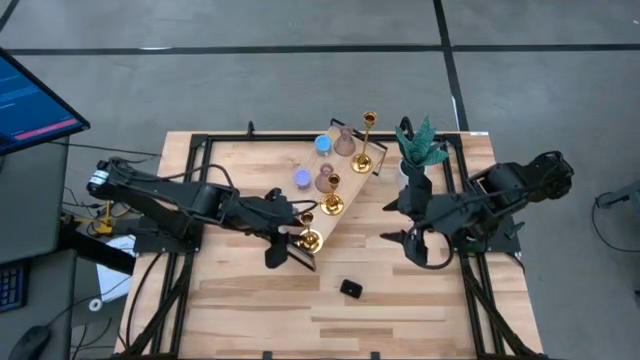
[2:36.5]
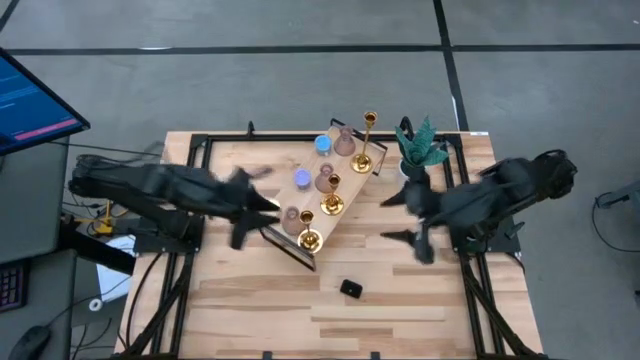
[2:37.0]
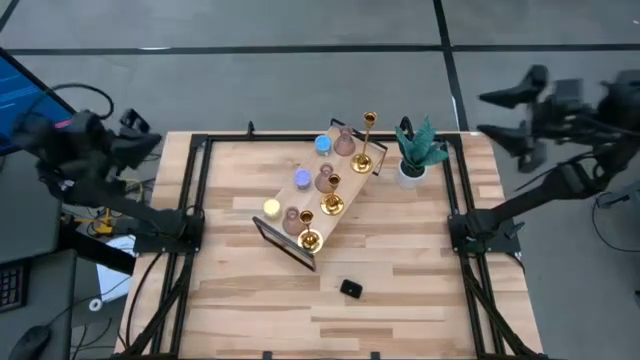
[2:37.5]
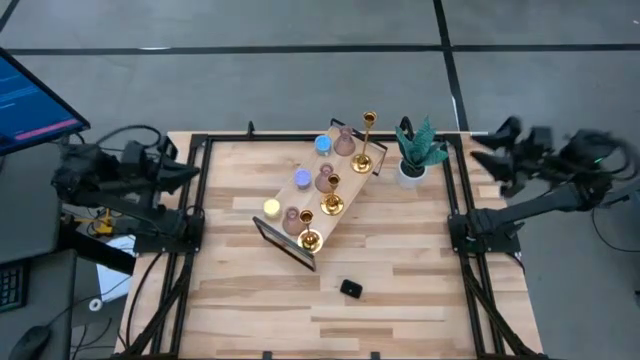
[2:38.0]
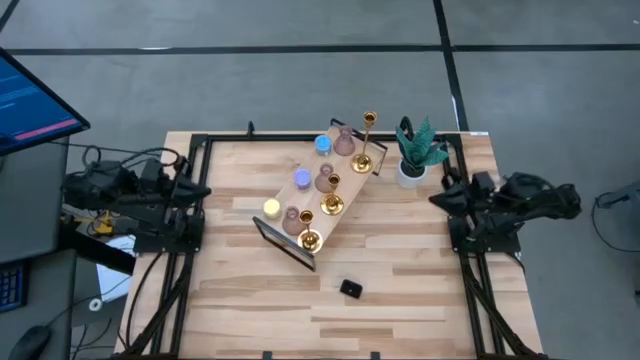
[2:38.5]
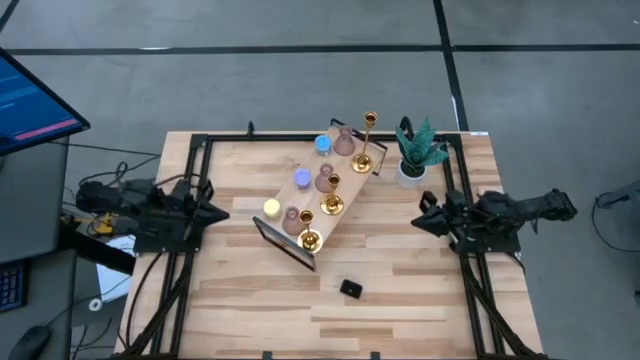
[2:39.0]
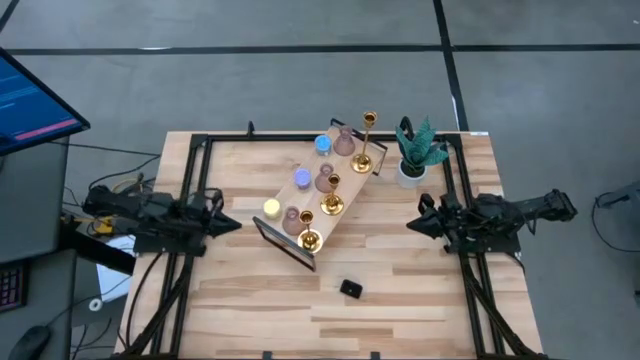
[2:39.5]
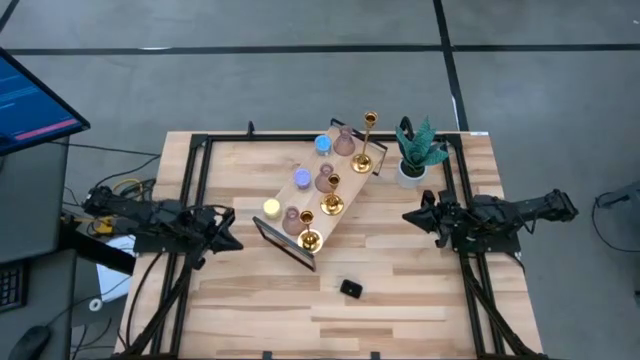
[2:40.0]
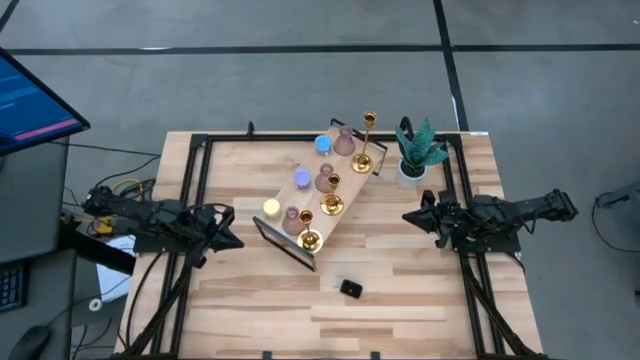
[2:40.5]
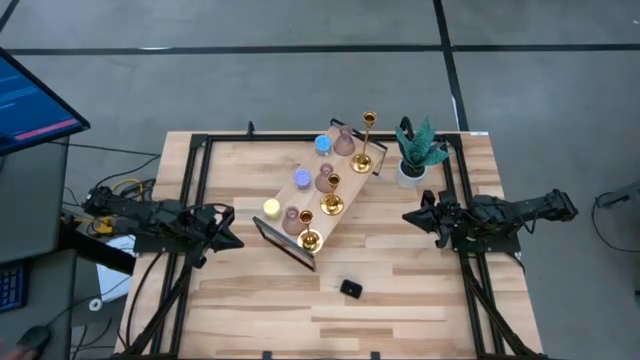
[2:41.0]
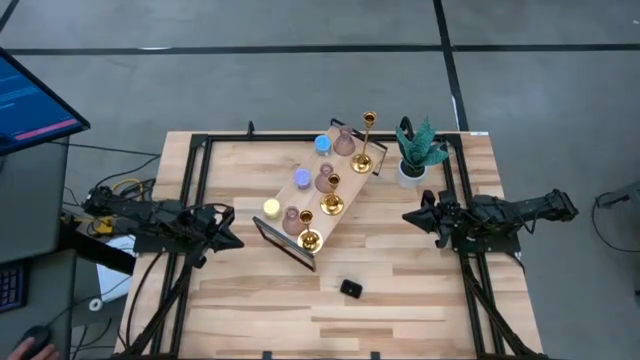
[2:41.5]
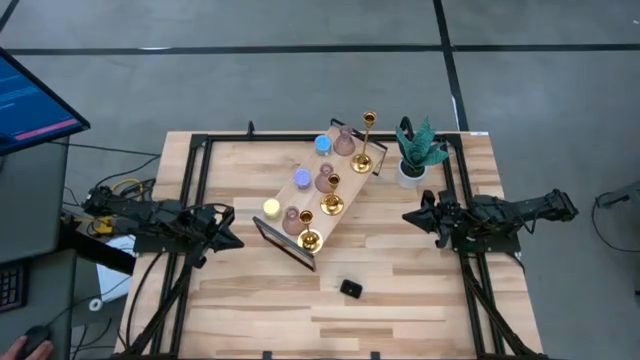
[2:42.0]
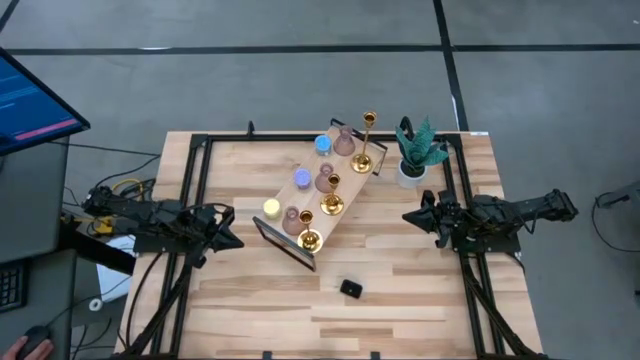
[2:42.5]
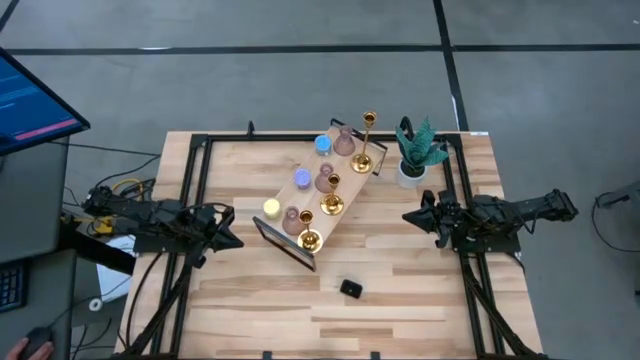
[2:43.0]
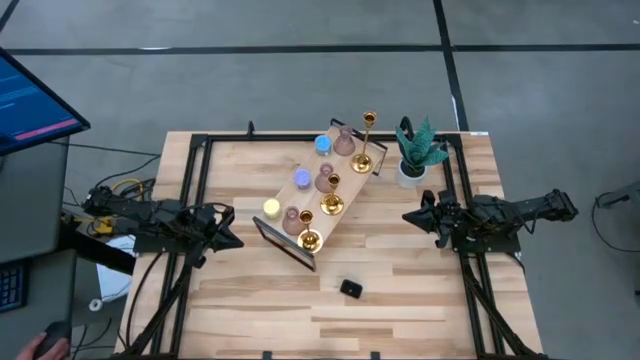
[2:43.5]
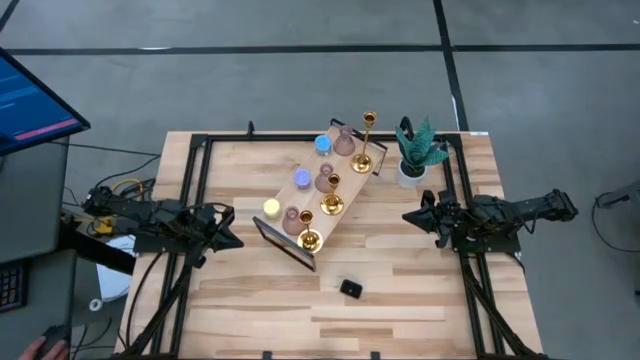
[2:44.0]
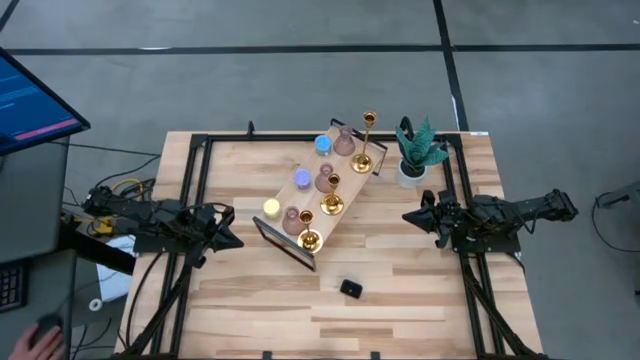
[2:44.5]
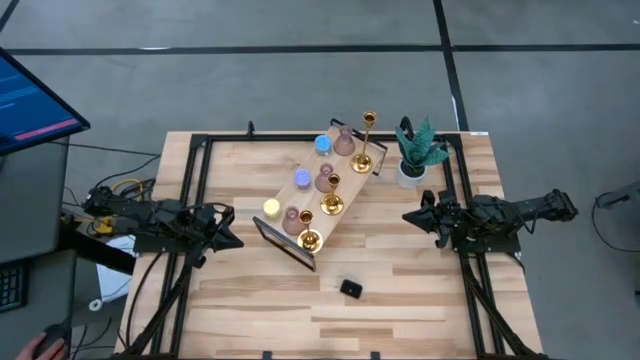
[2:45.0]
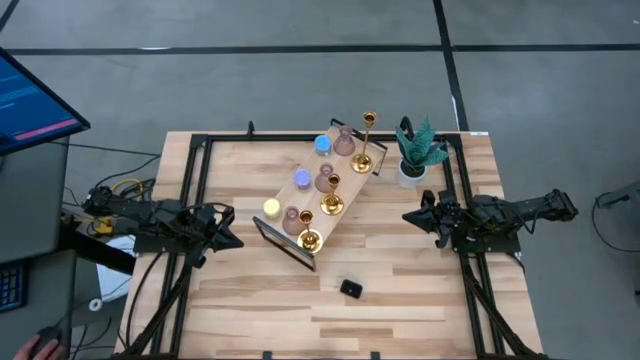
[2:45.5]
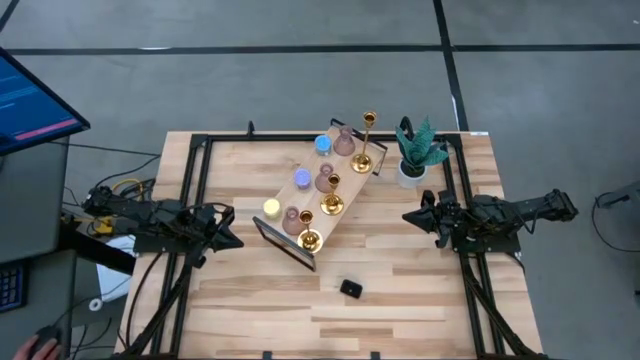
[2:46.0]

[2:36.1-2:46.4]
Task: Pick & Place candle stick holders
Return to Home Position

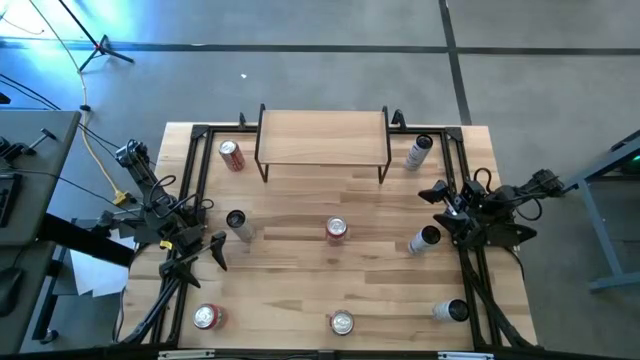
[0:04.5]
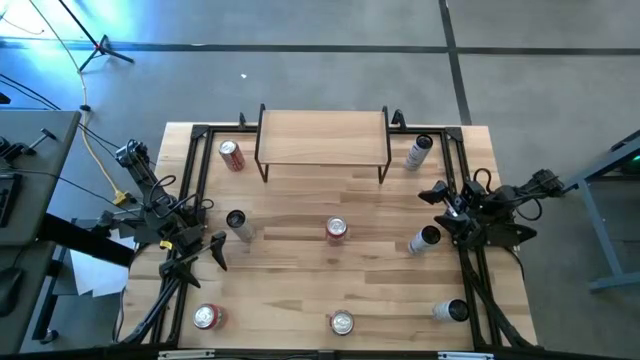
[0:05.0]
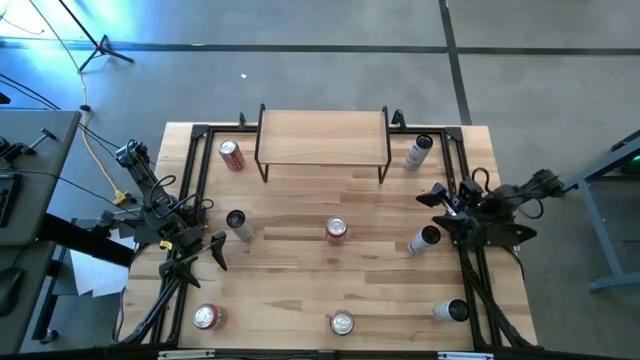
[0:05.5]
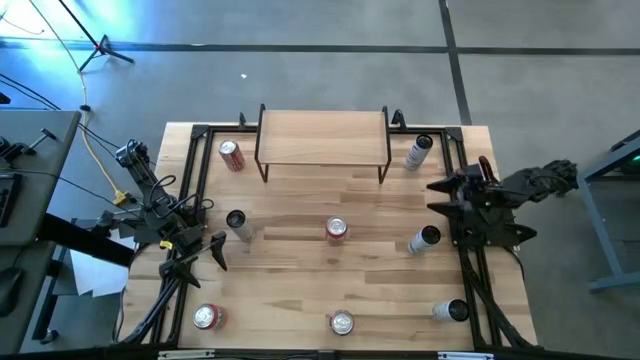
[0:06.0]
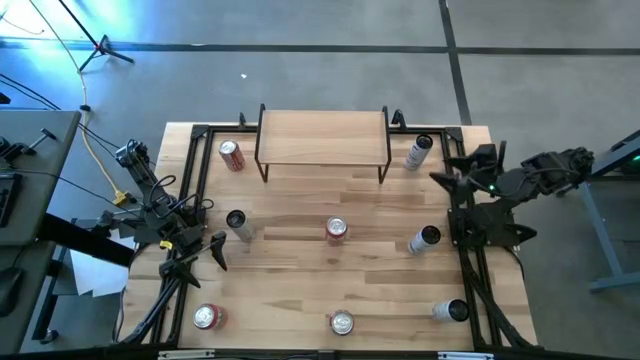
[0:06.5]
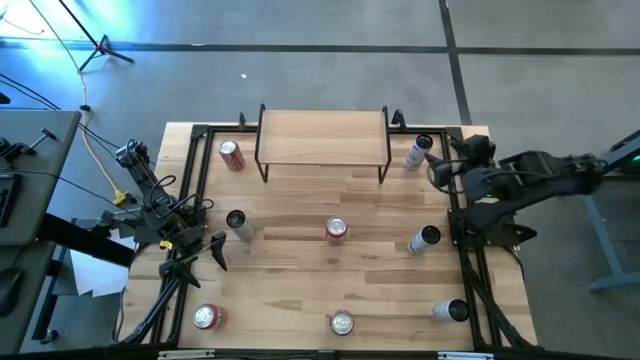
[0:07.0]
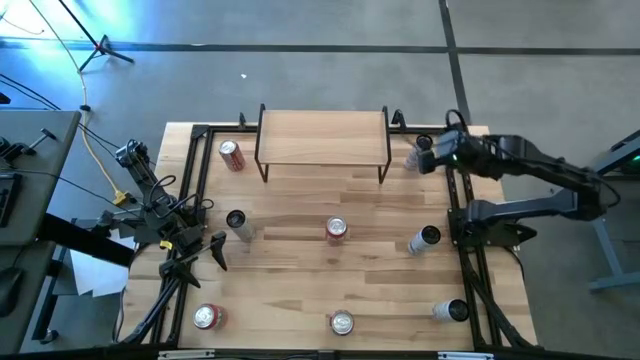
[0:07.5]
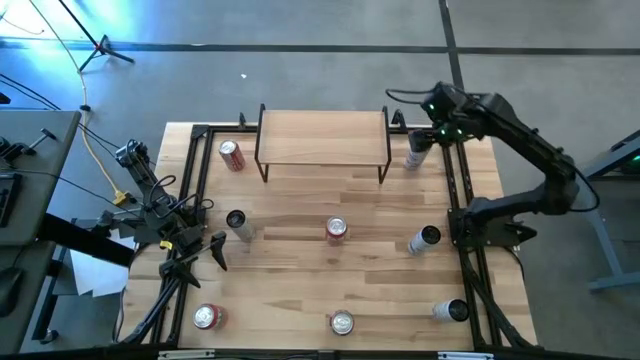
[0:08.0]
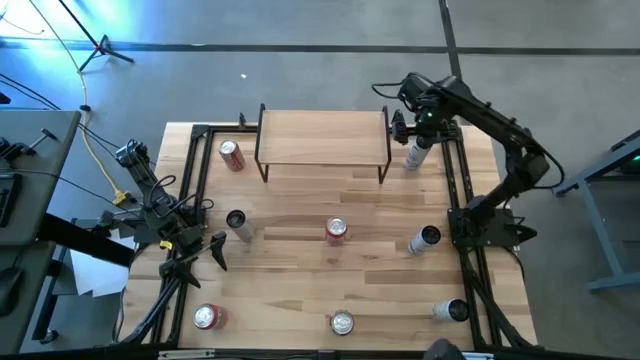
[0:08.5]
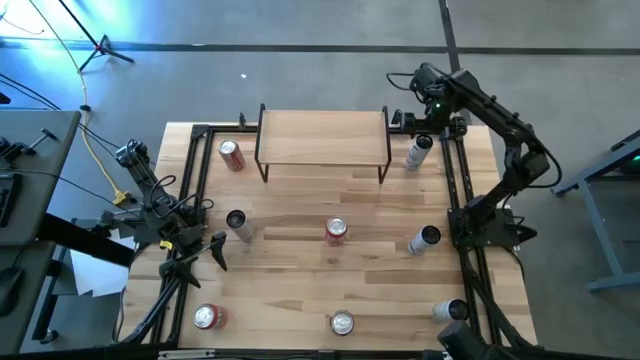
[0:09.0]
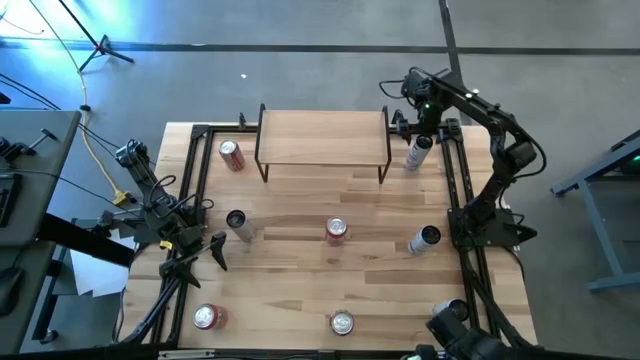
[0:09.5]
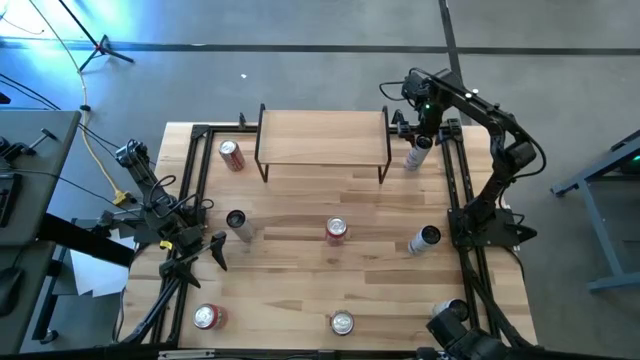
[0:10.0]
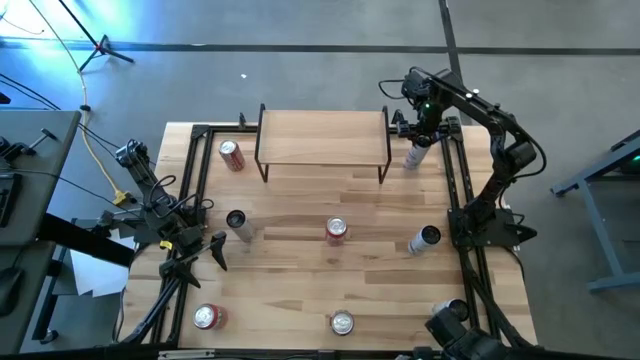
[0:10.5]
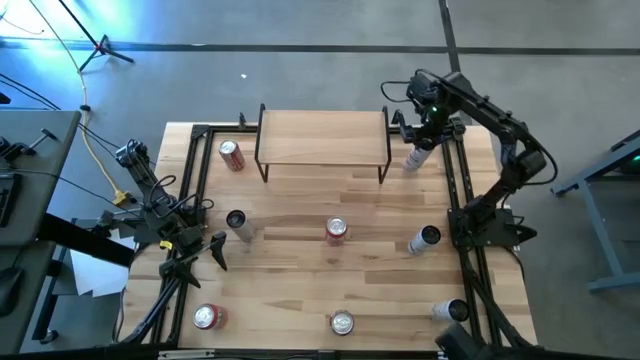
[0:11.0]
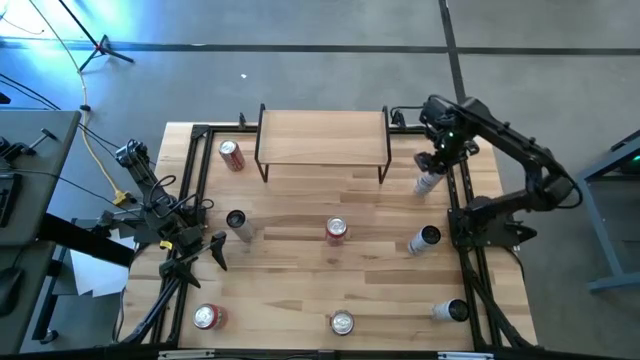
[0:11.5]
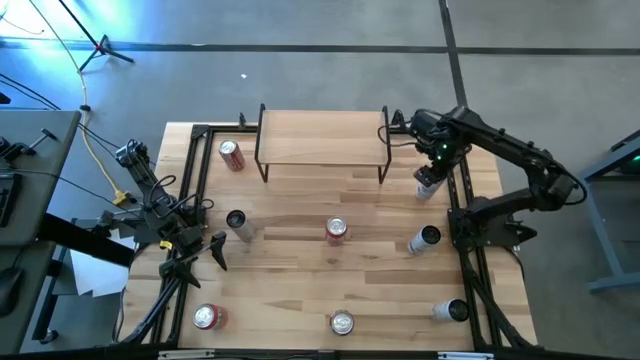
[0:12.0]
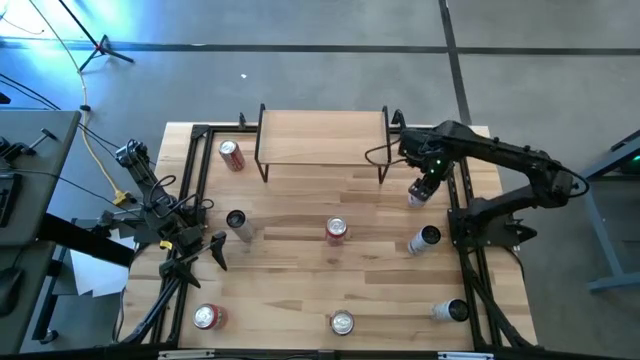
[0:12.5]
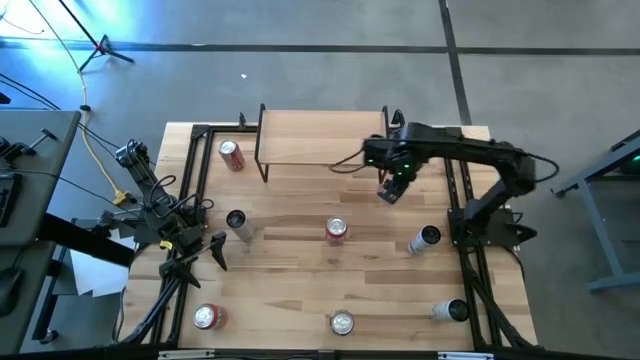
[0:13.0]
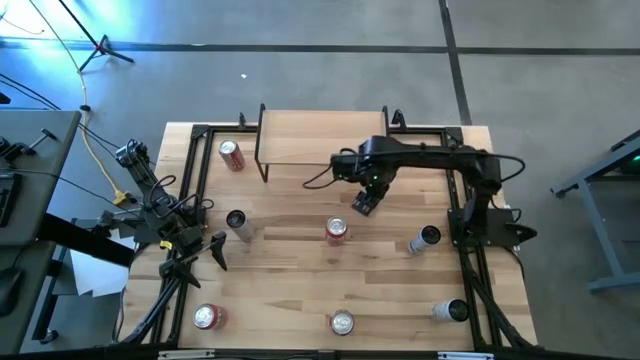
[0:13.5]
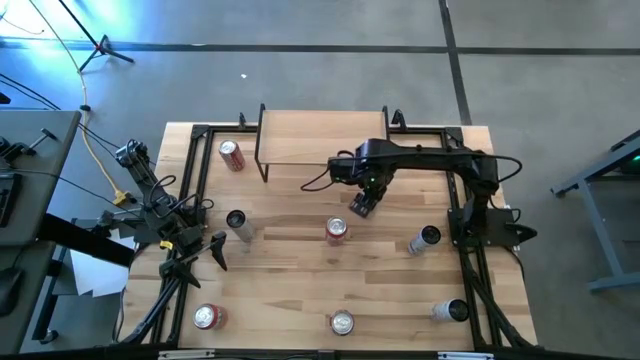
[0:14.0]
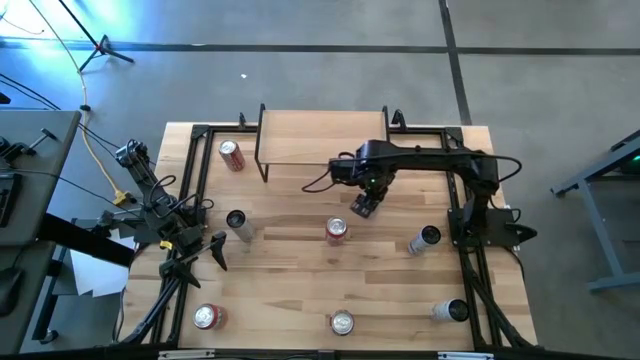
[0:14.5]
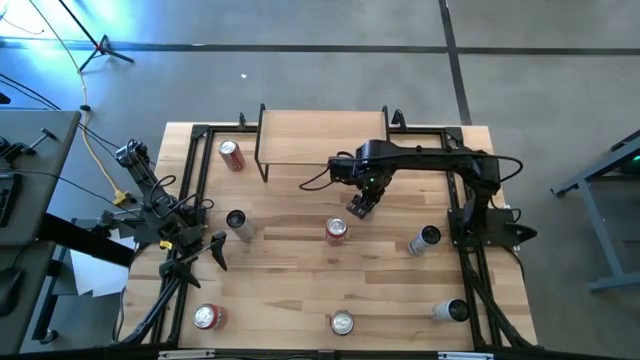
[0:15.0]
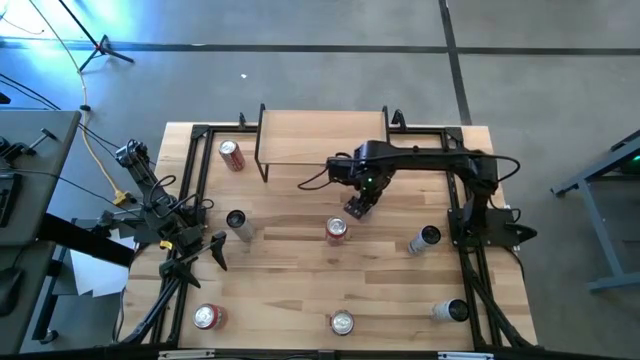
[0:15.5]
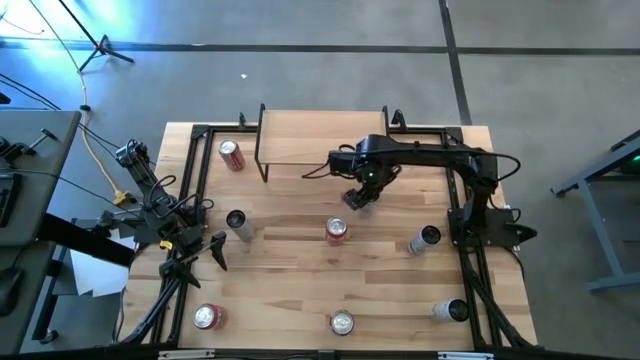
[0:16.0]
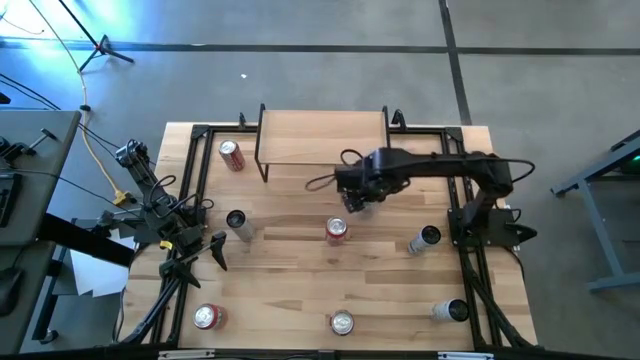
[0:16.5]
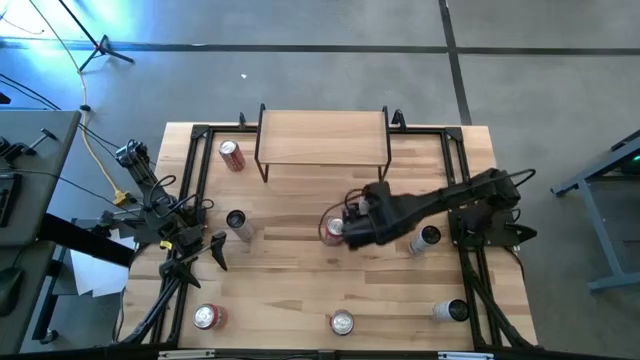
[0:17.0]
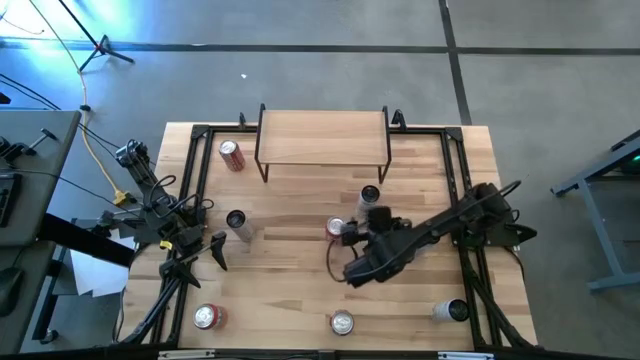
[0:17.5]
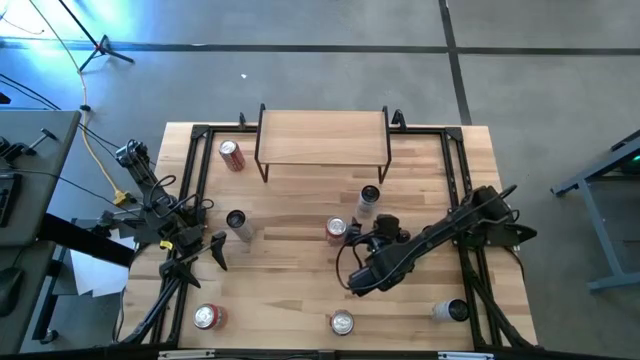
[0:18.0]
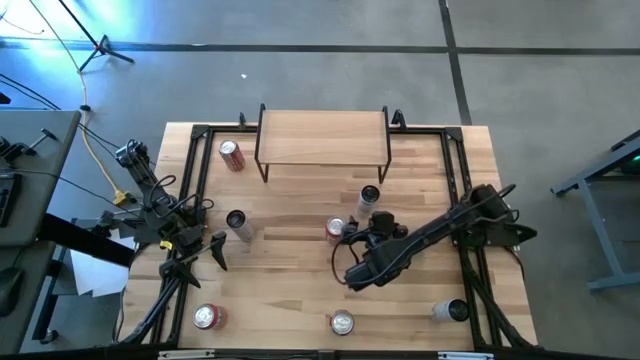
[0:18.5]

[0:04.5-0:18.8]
Task: Place canned beverage on shelf
Put the top white blue soda can on the shelf
